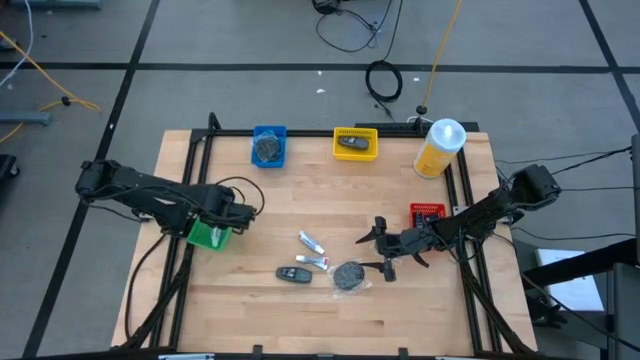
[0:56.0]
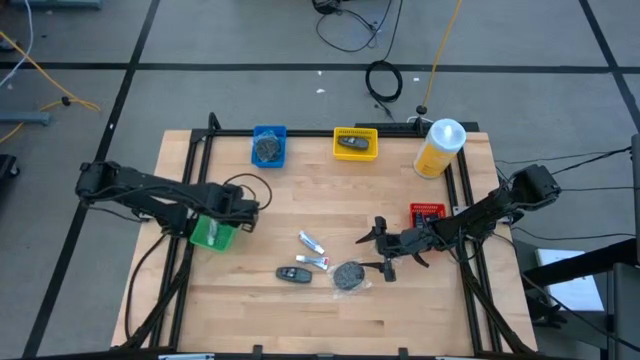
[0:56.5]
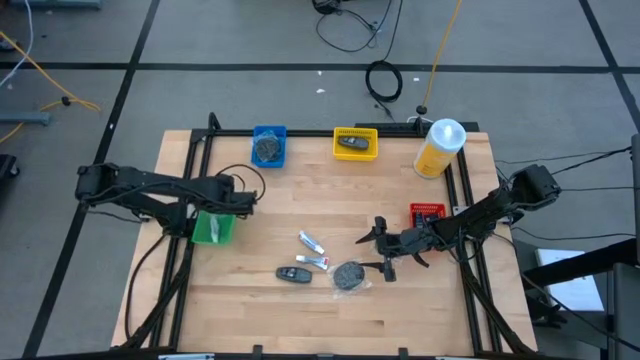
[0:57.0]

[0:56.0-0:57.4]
Task: Pick & Place Travel size toiletries
Adjust the green bin

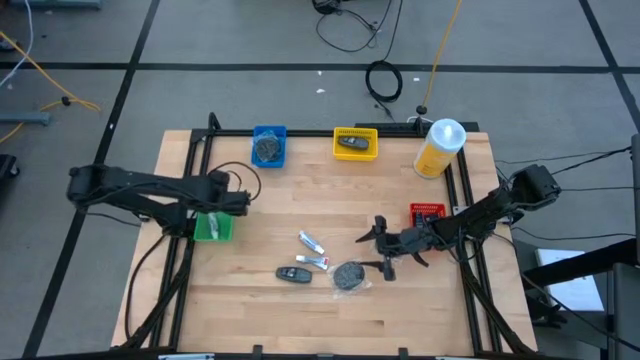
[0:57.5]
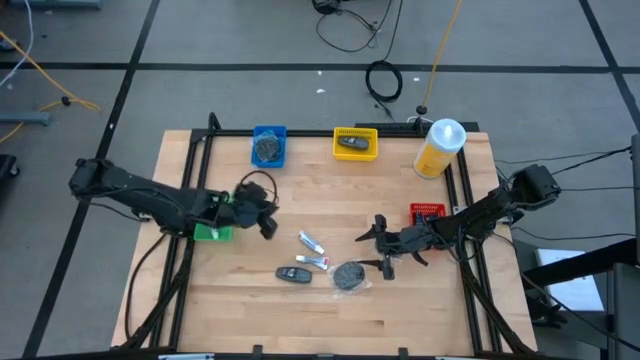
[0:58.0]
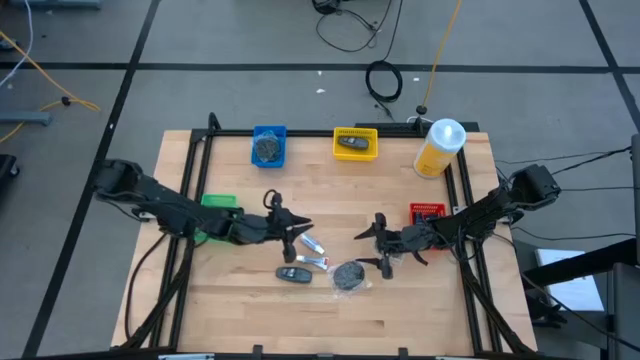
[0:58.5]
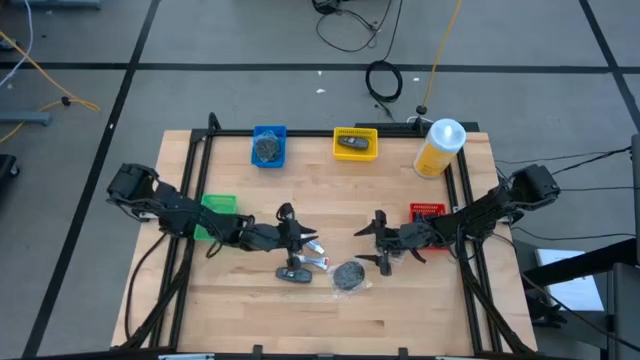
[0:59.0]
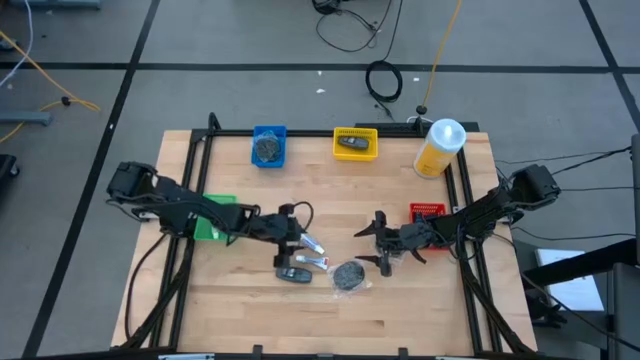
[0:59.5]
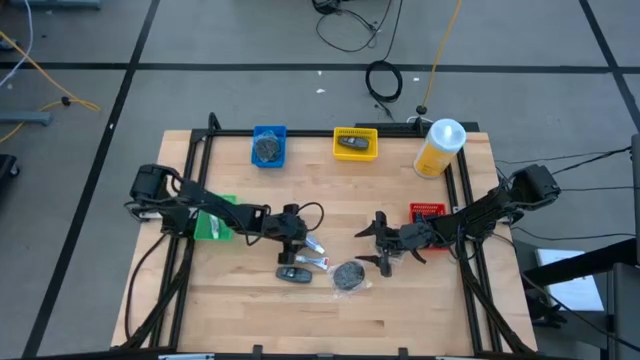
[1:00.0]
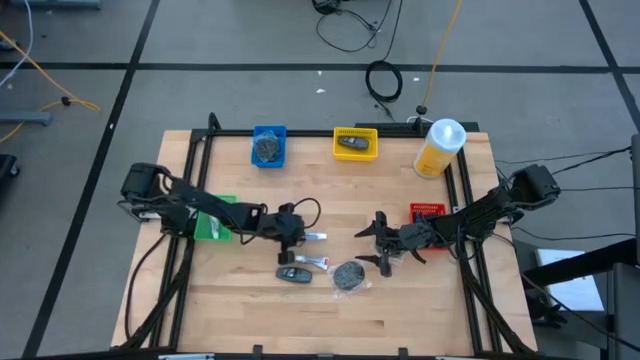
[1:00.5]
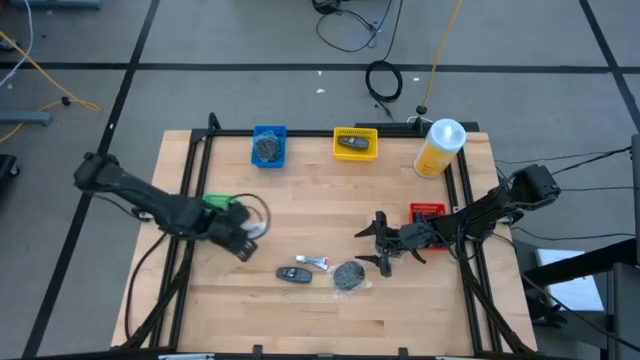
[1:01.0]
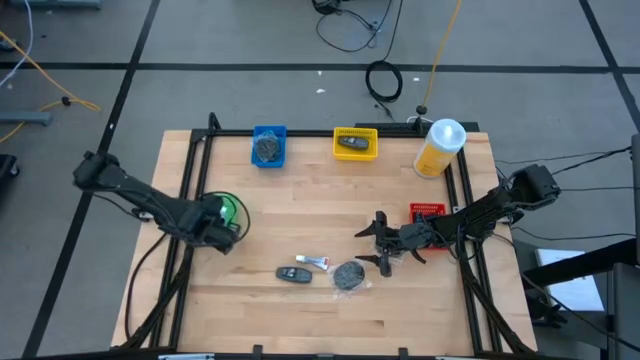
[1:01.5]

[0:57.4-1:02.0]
Put the white toothpaste into the green bin

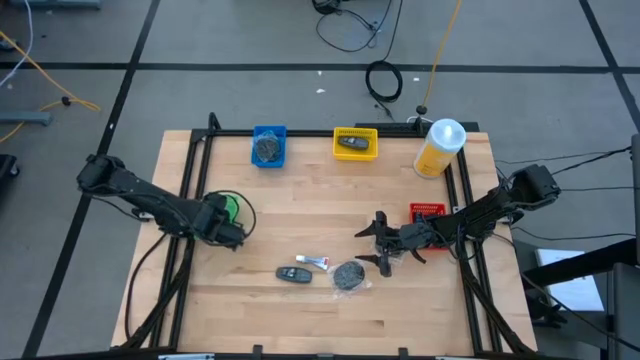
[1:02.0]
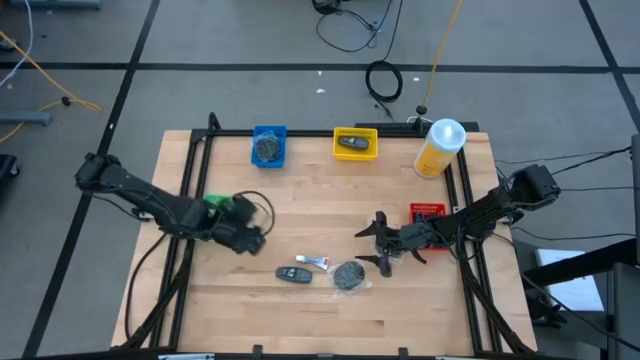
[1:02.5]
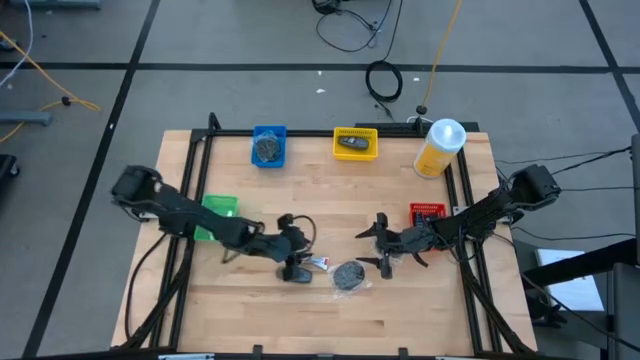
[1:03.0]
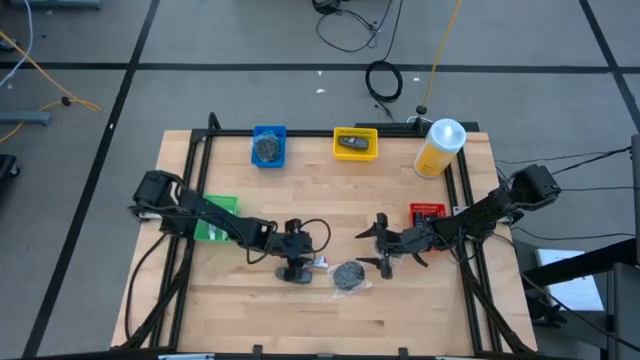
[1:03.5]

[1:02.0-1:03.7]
Put the white toothpaste into the green bin

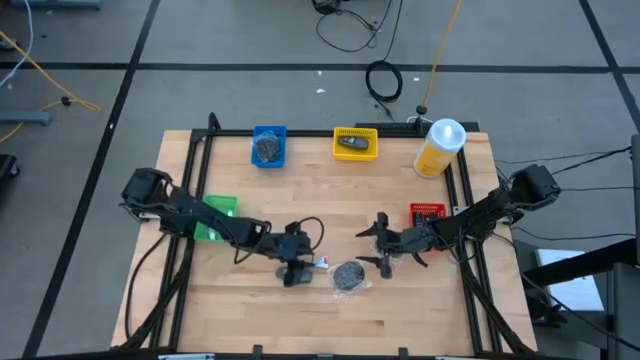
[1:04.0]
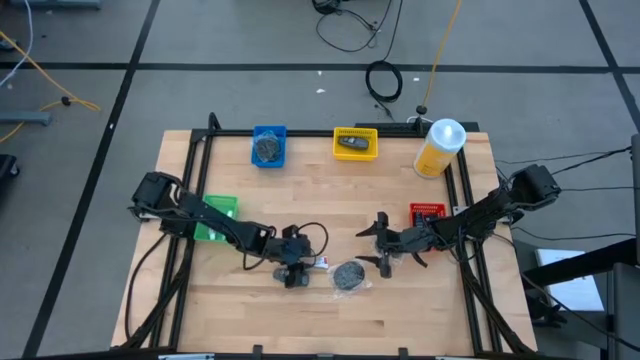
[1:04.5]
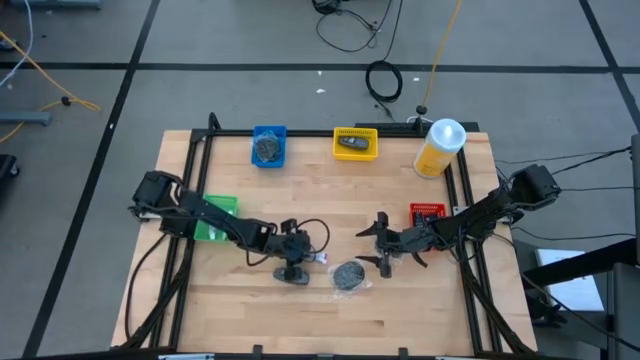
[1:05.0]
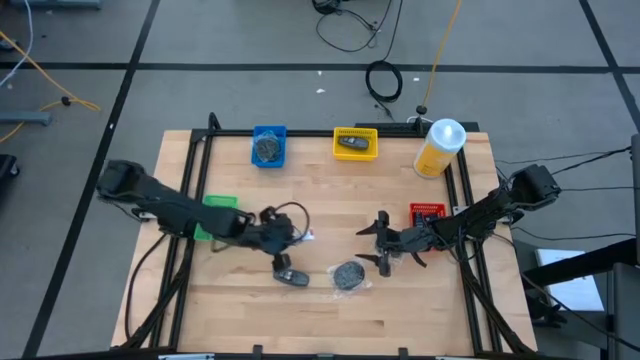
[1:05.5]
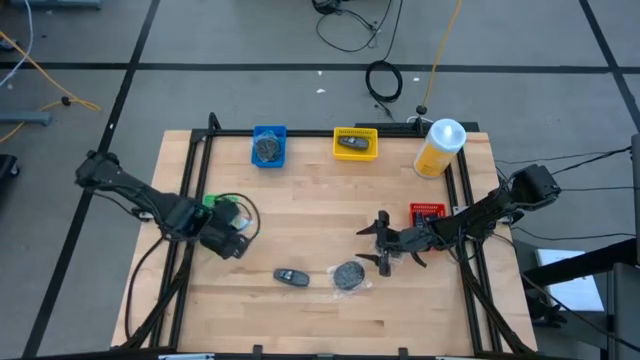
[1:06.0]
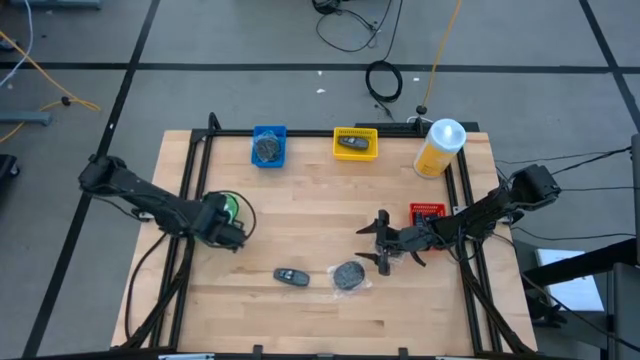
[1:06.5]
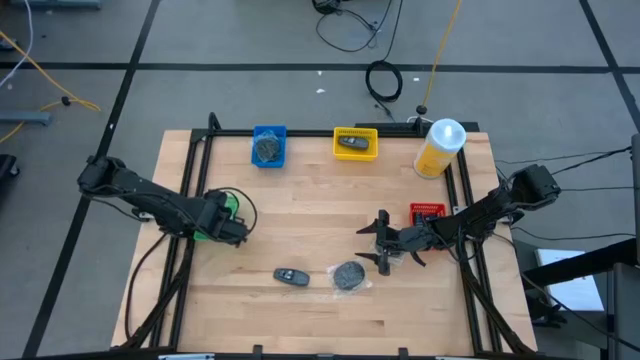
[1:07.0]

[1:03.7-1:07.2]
Put the white toothpaste into the green bin

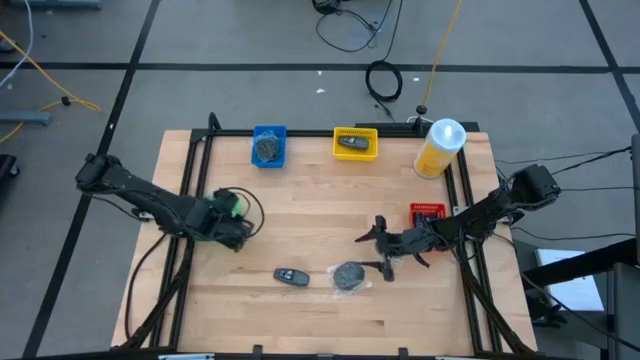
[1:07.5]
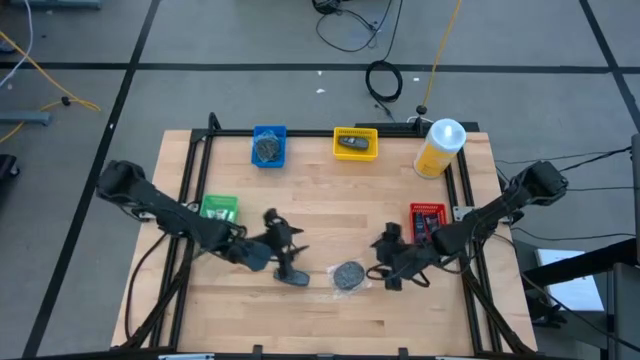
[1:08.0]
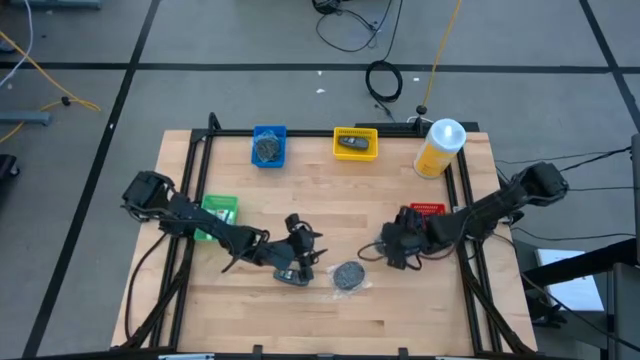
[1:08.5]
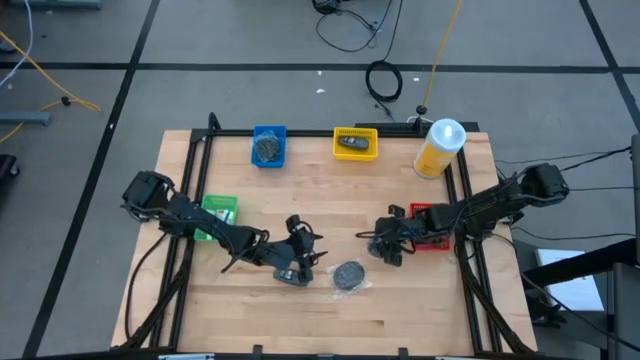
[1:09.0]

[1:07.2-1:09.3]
Put the black hairbrush into the blue bin

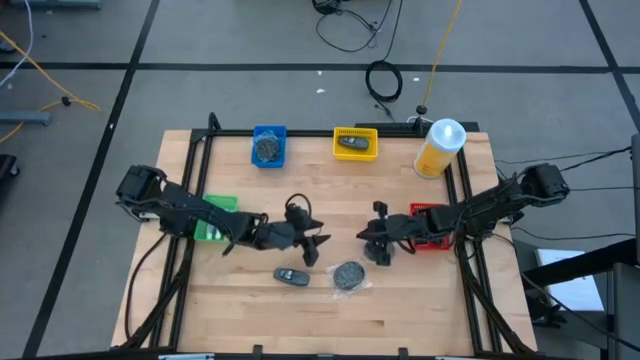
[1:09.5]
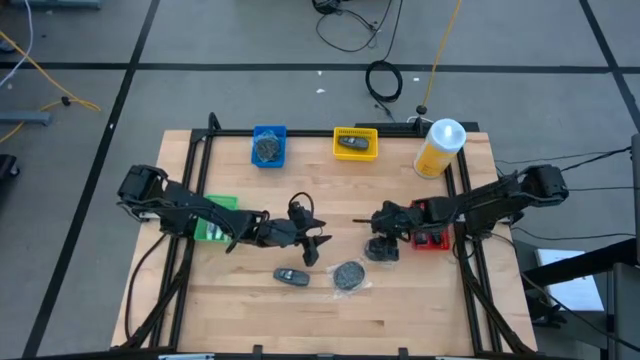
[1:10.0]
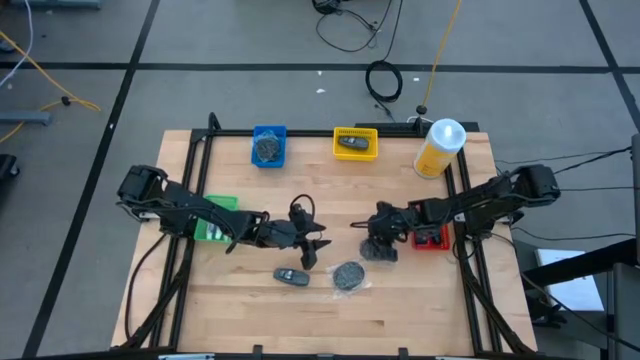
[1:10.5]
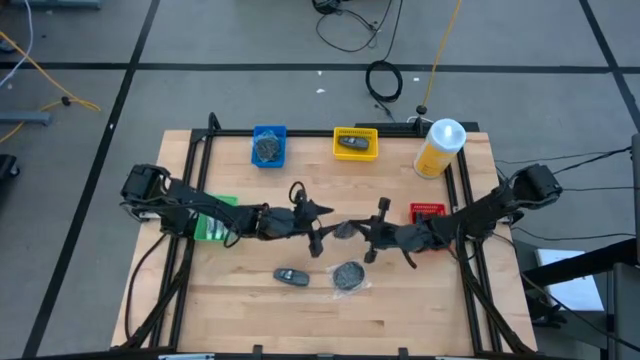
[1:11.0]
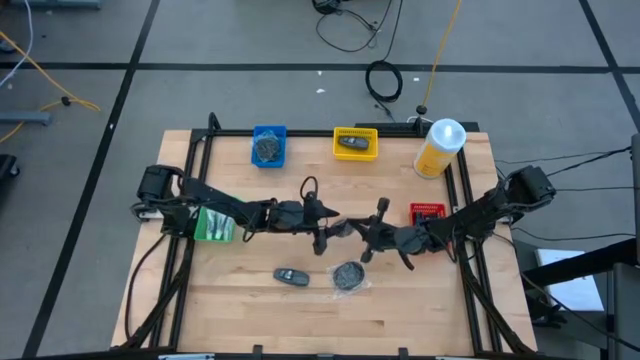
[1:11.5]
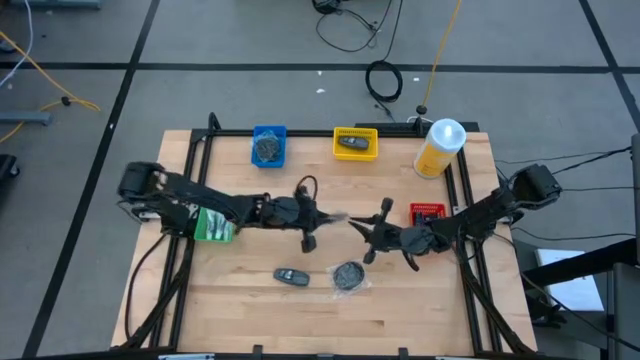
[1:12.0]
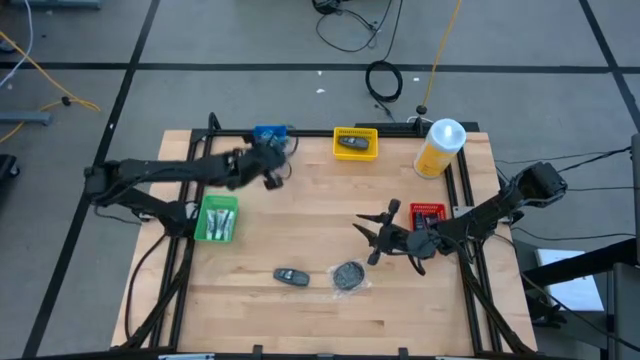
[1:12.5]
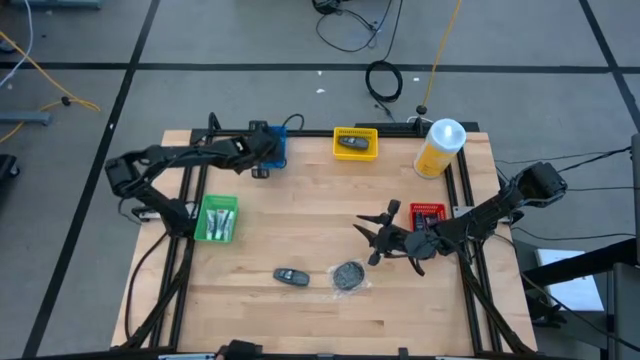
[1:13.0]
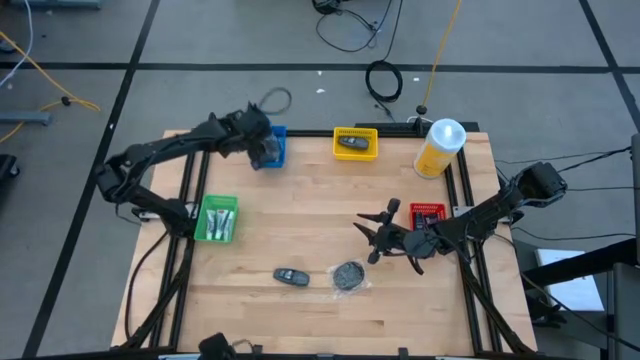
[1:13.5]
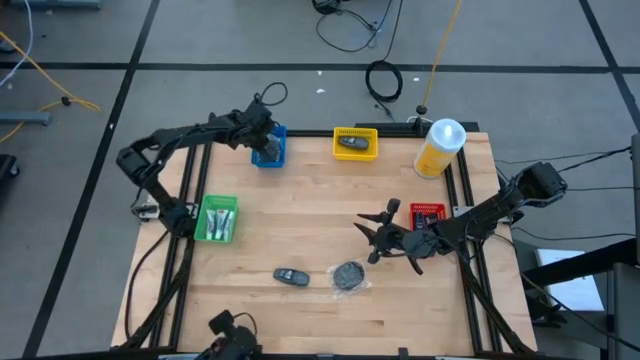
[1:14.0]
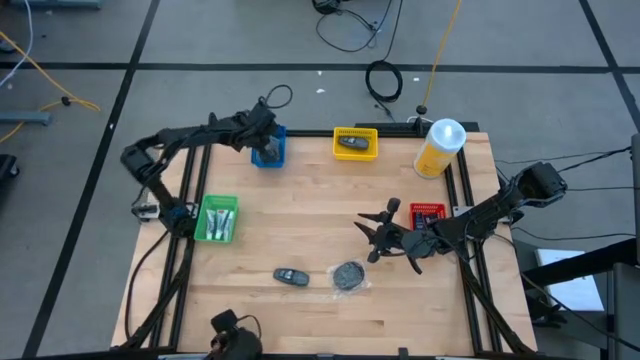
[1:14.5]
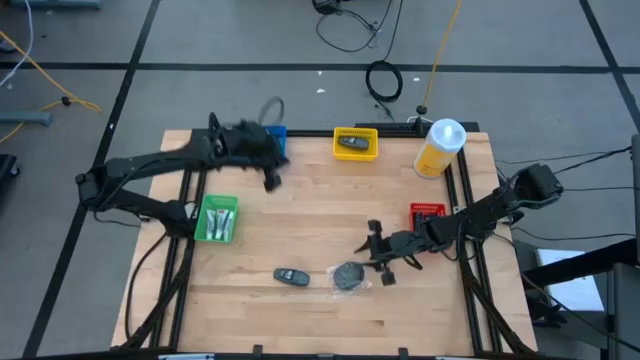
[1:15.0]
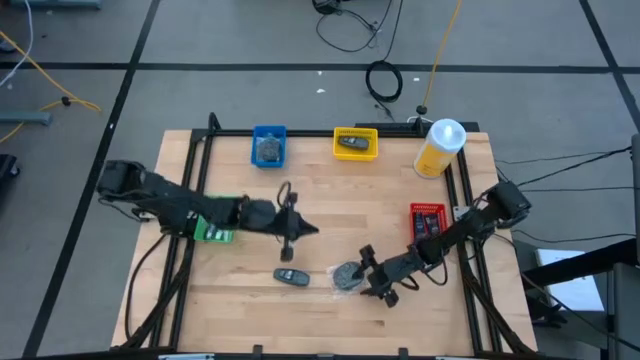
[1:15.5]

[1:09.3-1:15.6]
Put the right black hairbrush into the blue bin

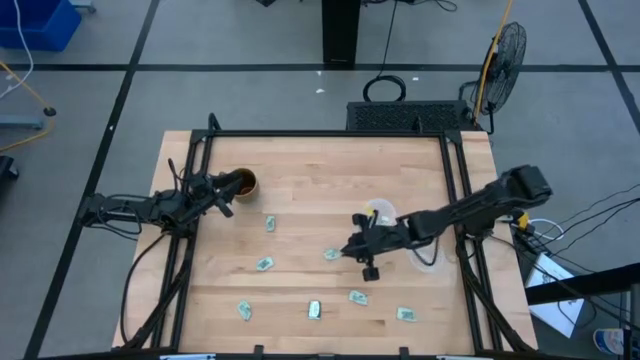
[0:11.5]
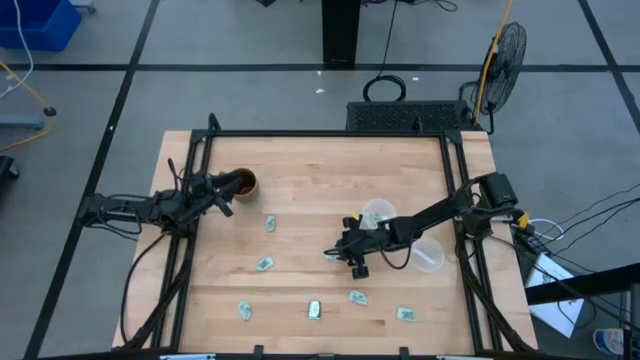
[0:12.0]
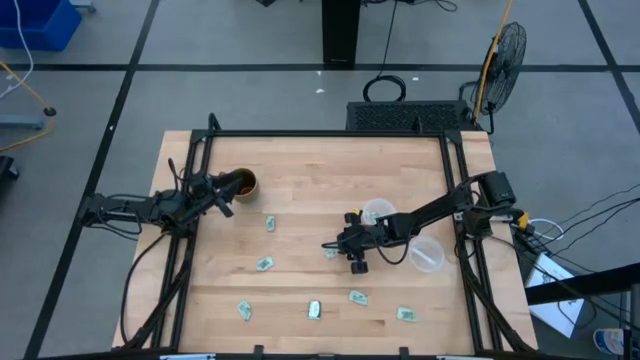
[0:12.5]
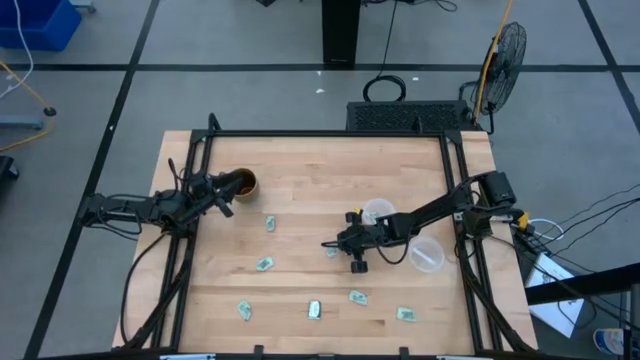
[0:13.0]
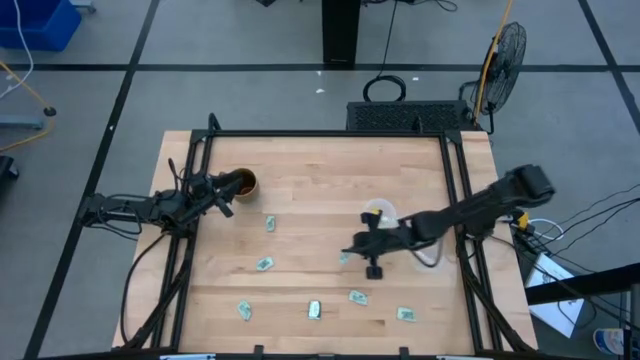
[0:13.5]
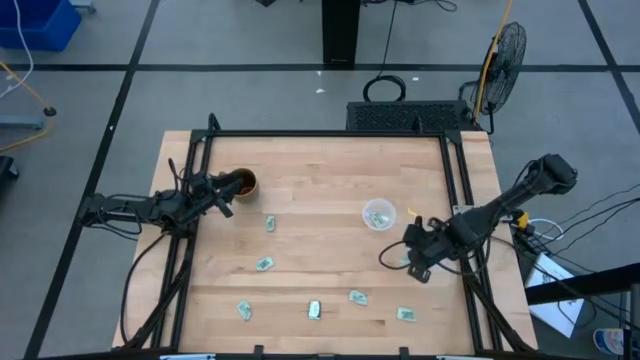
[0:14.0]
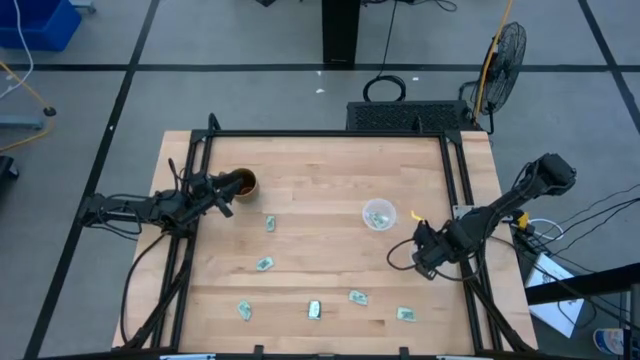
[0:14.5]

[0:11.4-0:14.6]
Task: Pick and place items into bin
Put the white stevia packet into the bottom transparent bin
